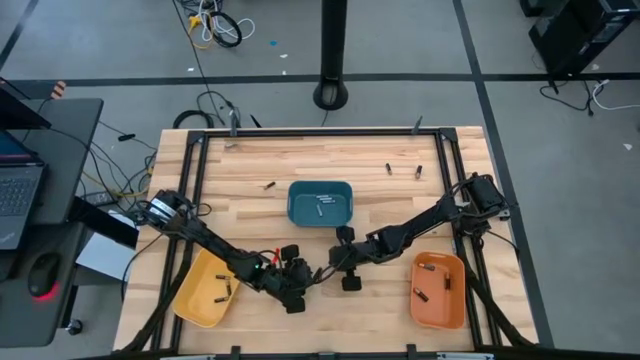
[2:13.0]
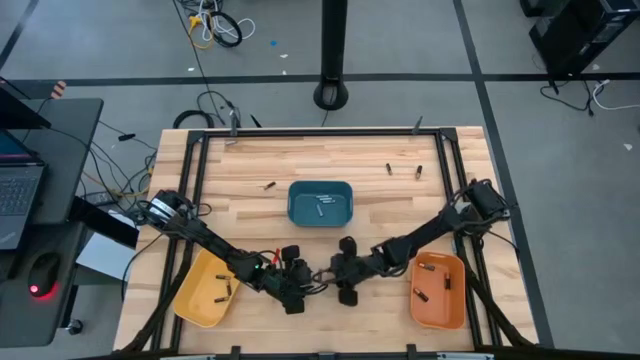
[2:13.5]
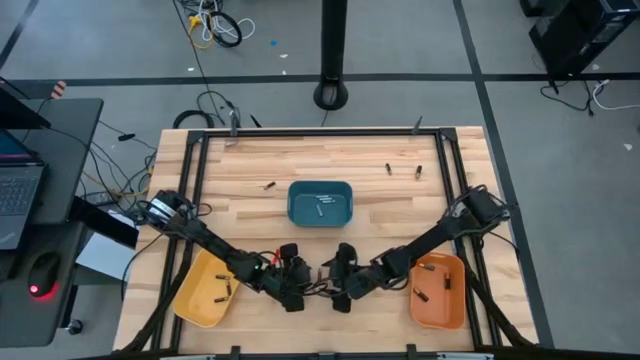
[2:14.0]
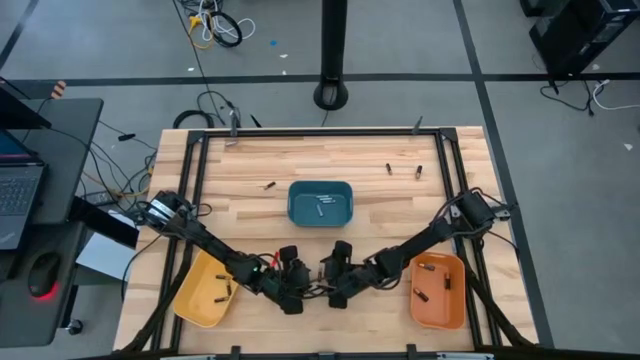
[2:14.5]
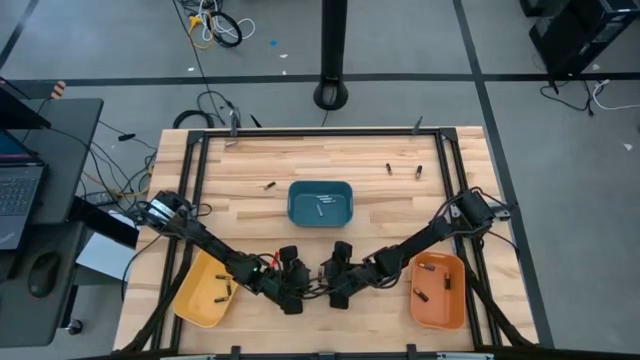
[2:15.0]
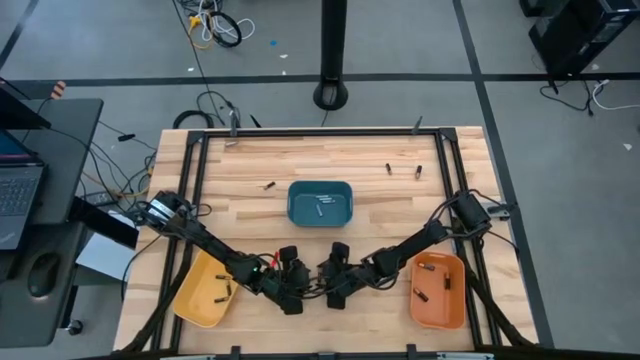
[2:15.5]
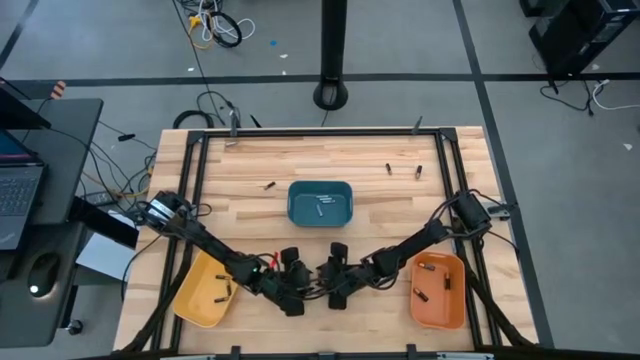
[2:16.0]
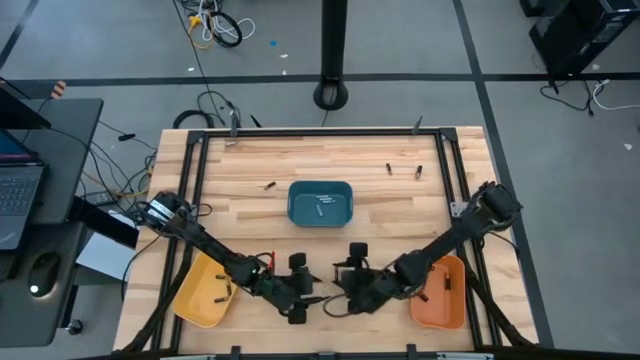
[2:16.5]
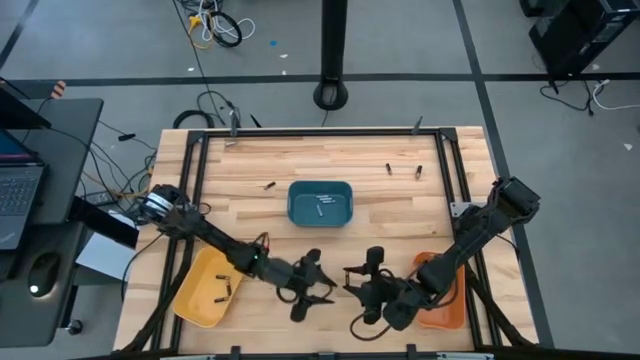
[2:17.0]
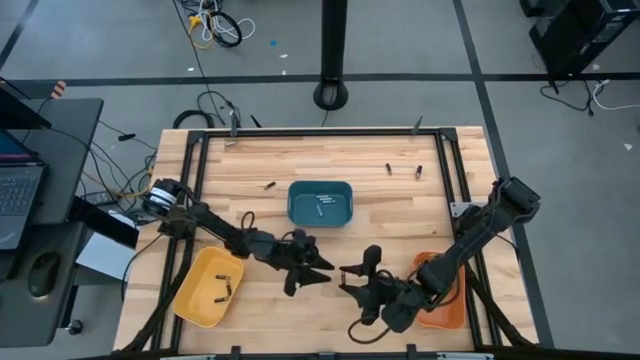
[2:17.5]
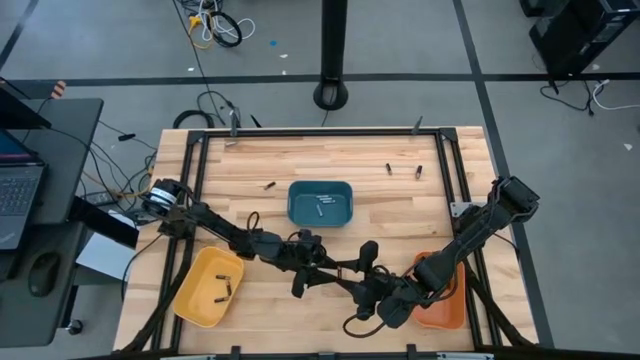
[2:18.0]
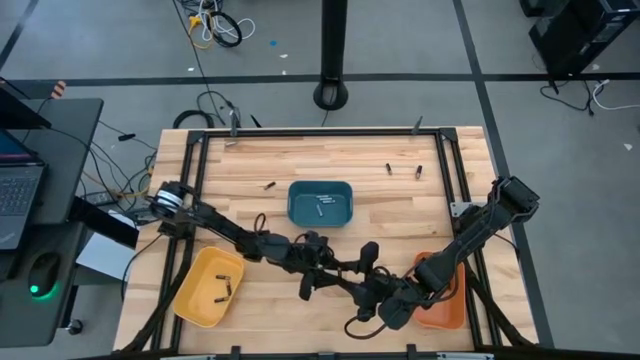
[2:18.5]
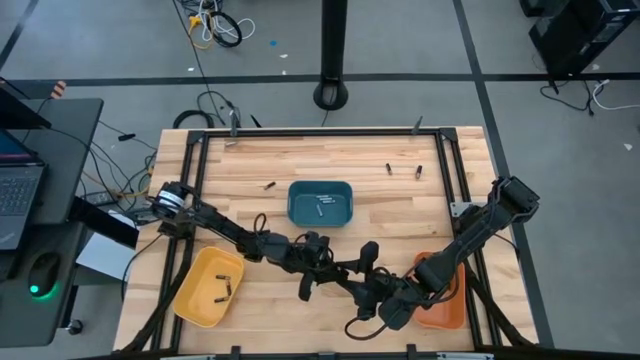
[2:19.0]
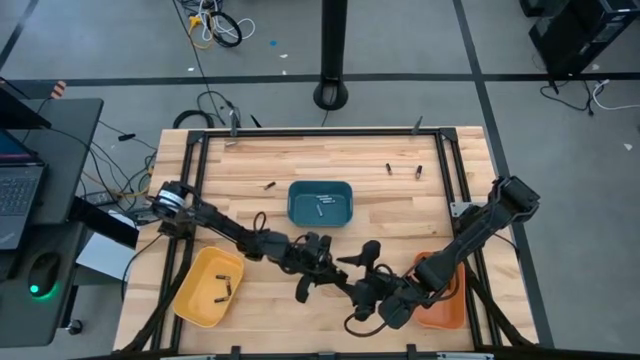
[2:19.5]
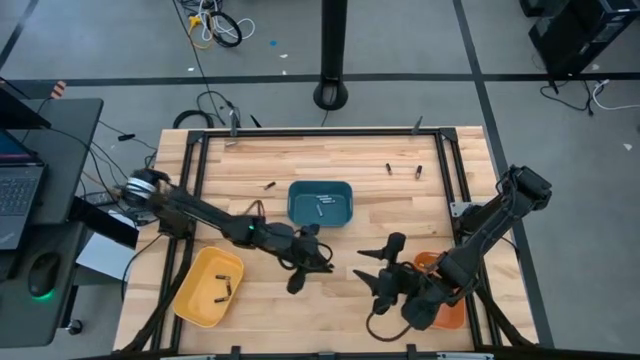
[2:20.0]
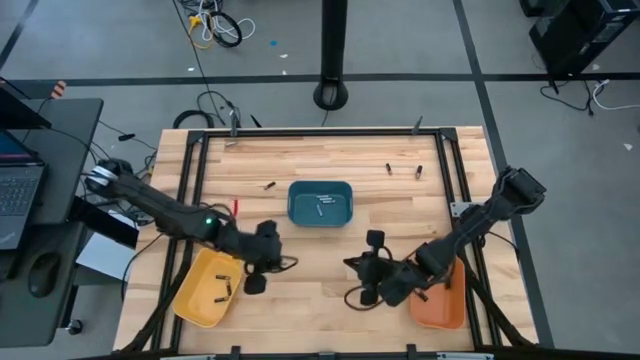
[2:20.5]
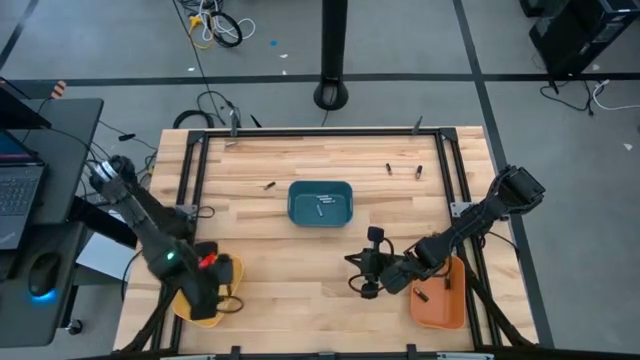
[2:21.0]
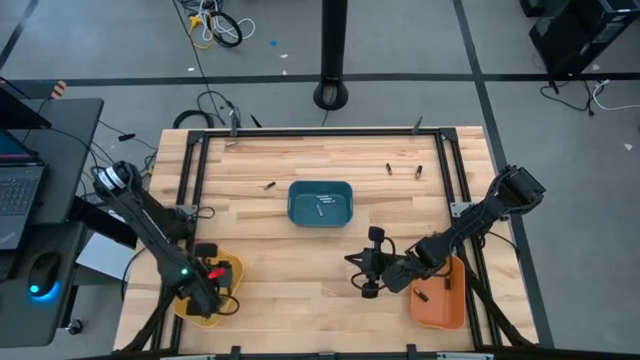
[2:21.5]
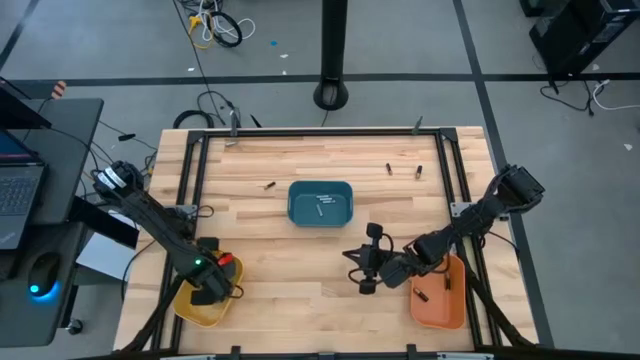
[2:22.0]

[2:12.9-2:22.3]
Task: Sort batteries
Put the black battery into the yellow bin

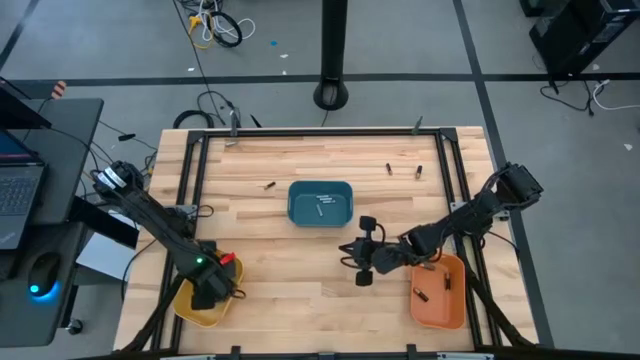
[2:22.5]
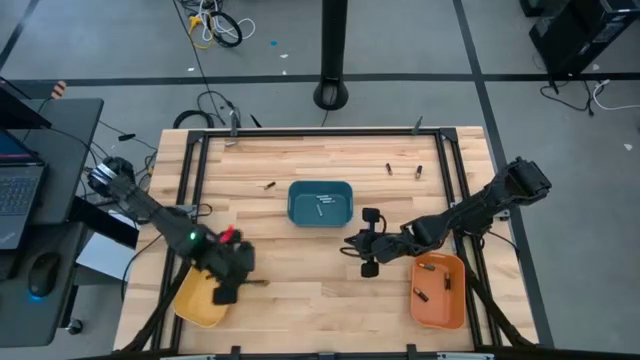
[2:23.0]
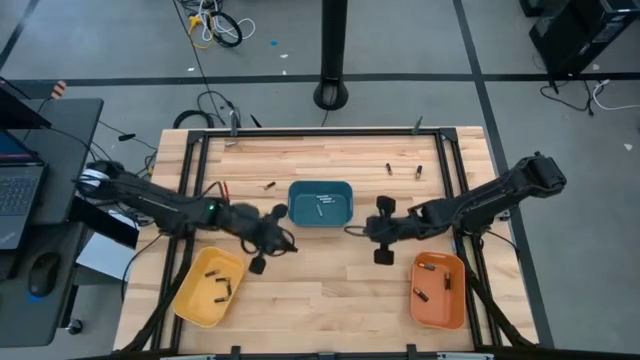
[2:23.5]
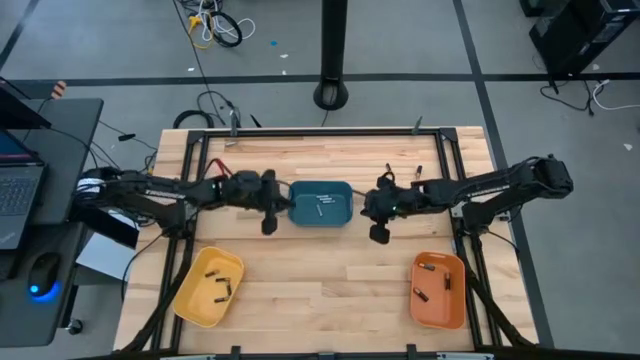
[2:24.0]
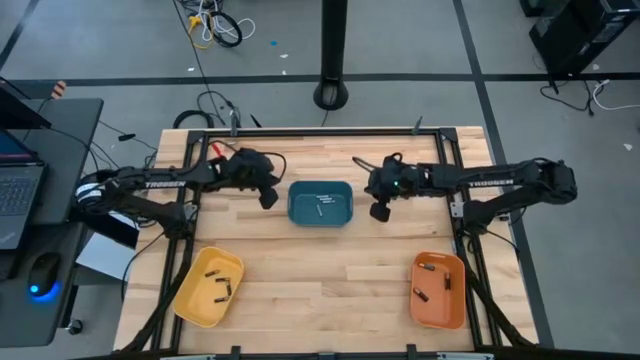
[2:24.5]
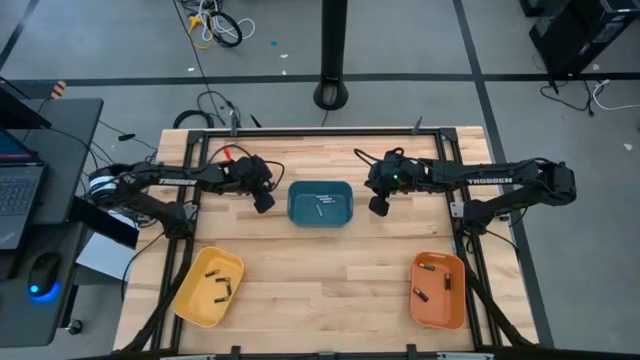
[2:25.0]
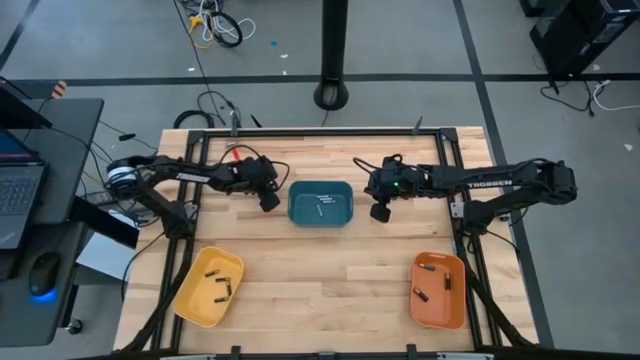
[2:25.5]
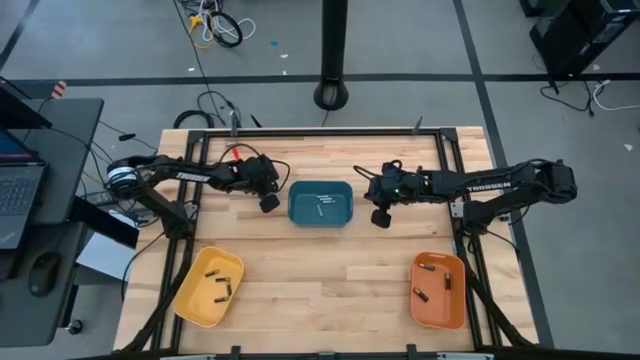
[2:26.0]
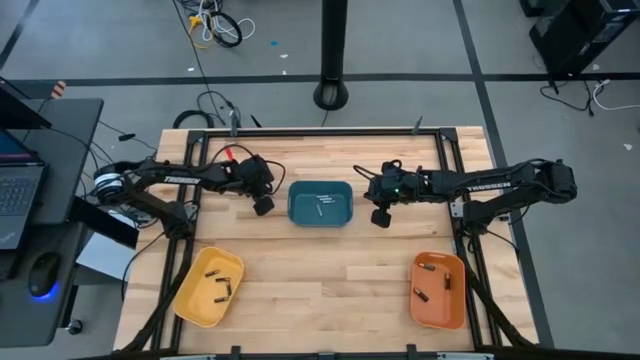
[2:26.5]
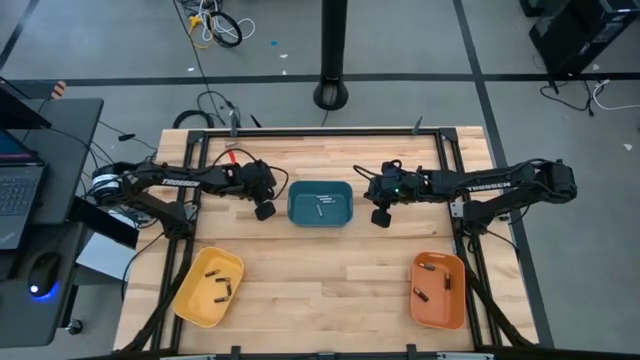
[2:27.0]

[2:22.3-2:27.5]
Put the black battery into the yellow bin

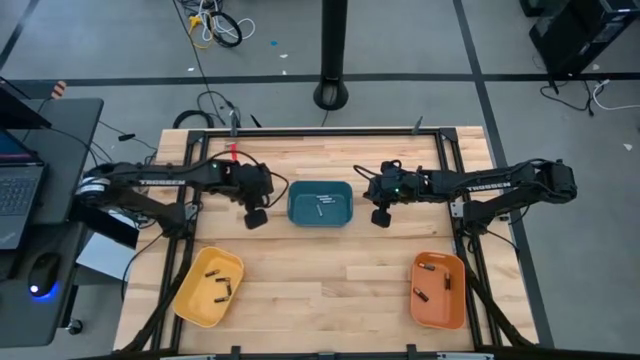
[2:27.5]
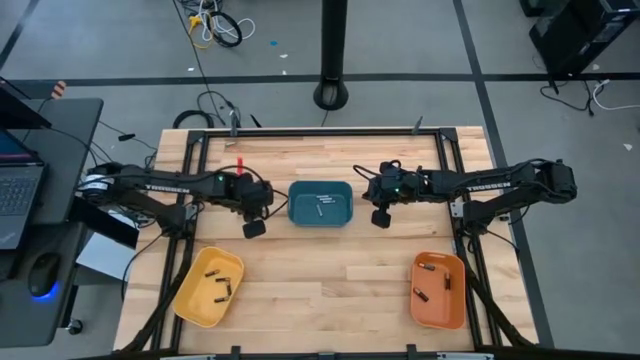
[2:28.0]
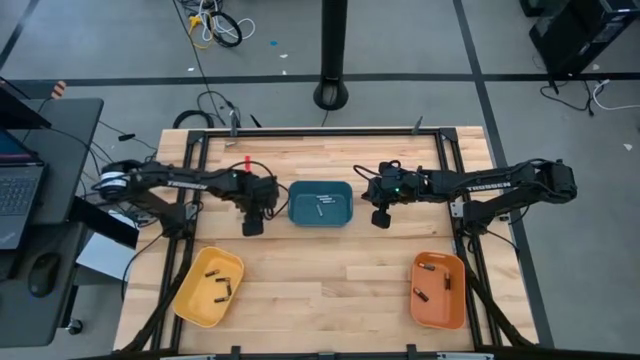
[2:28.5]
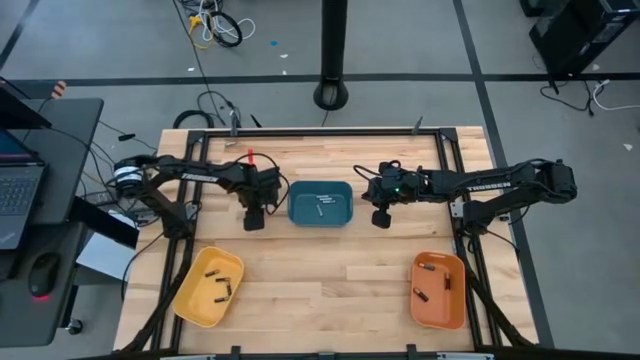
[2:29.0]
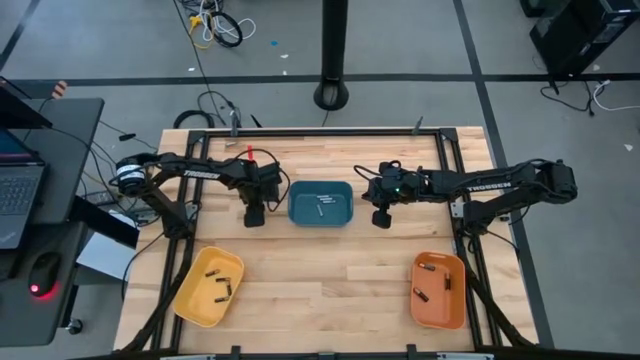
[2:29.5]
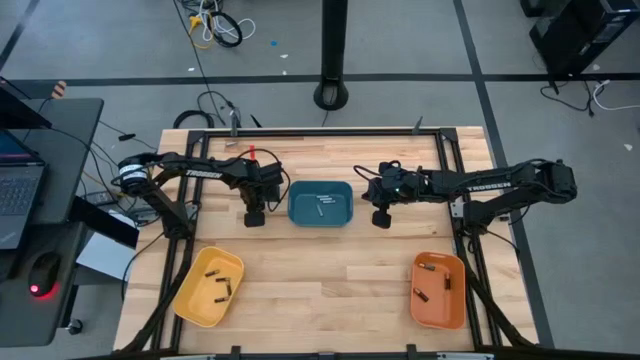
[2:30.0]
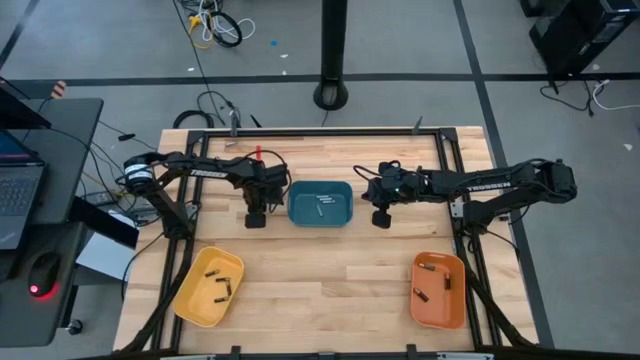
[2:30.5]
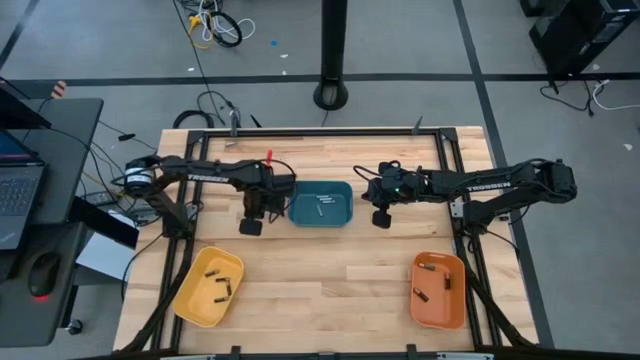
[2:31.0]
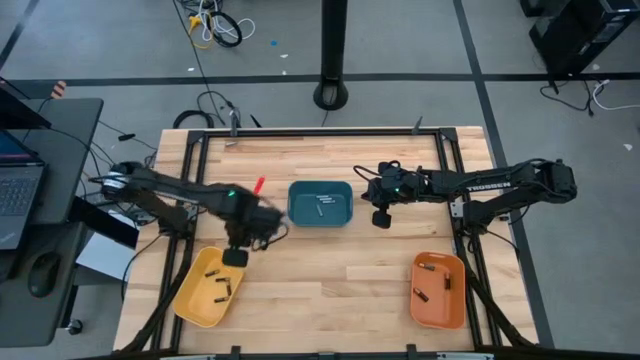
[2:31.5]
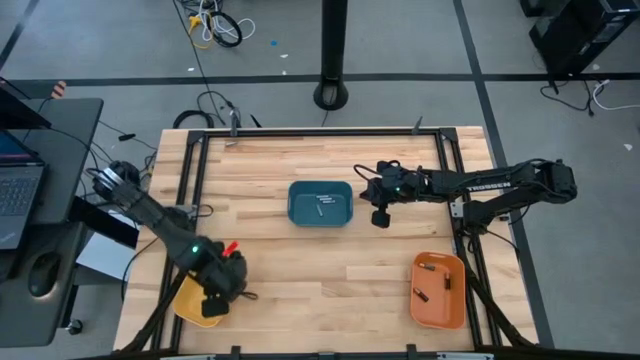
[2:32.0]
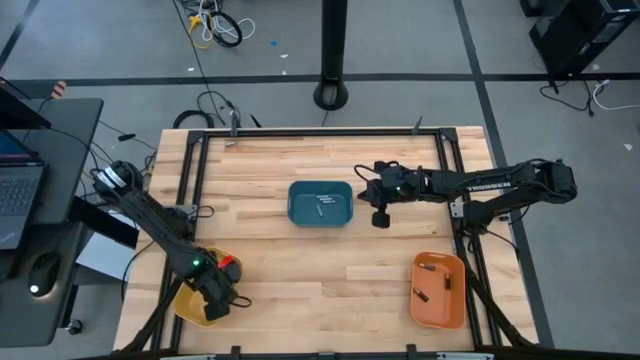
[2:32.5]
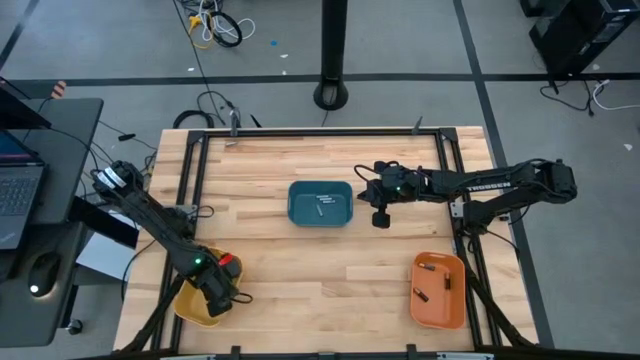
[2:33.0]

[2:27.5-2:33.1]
Put the black battery into the yellow bin

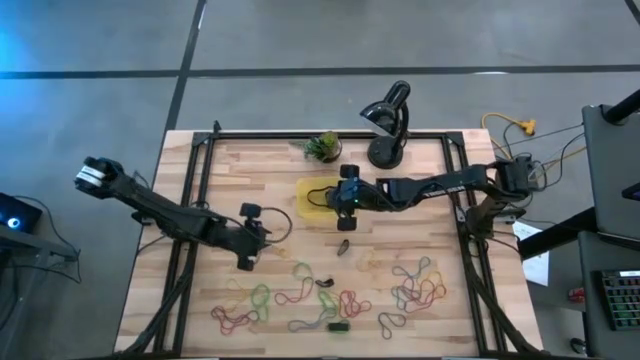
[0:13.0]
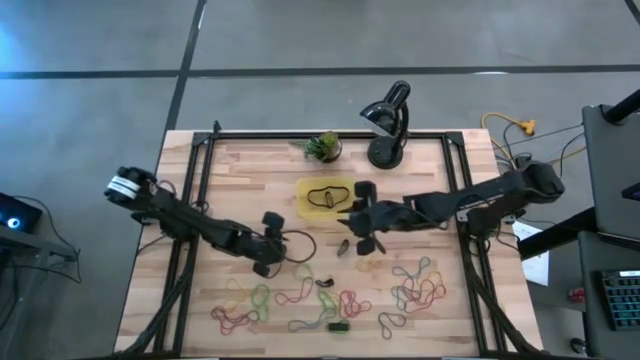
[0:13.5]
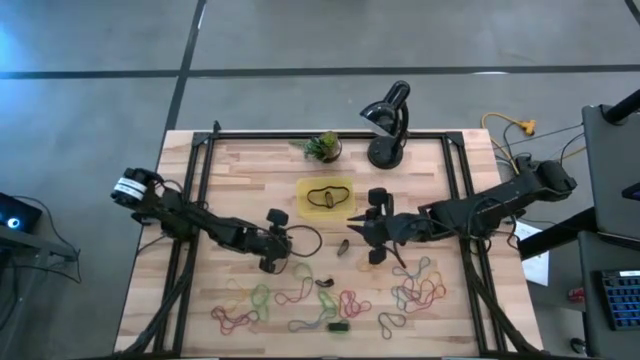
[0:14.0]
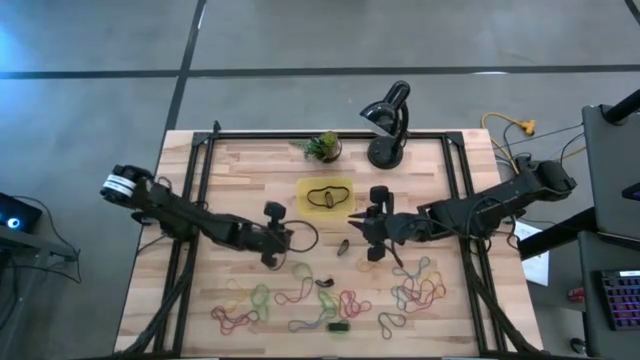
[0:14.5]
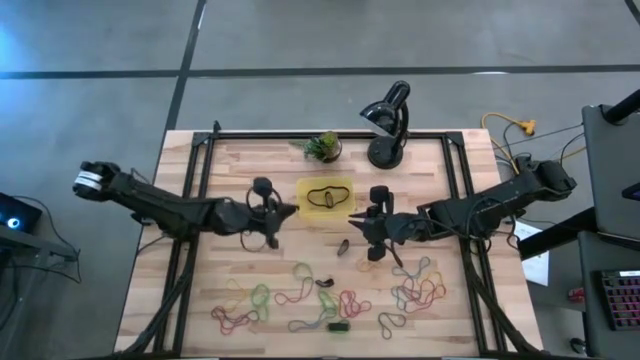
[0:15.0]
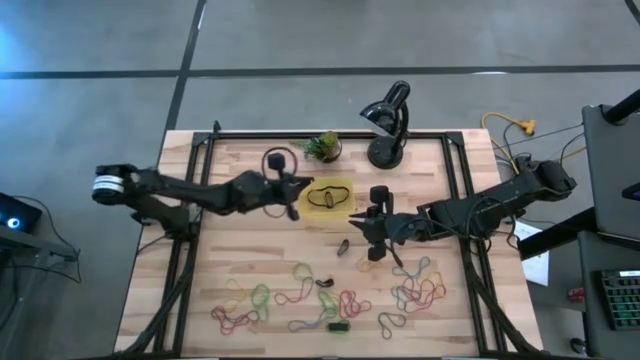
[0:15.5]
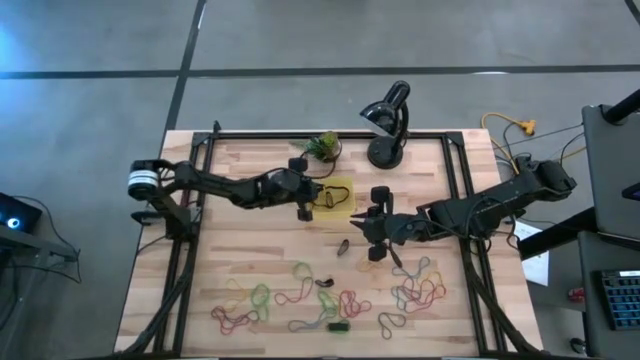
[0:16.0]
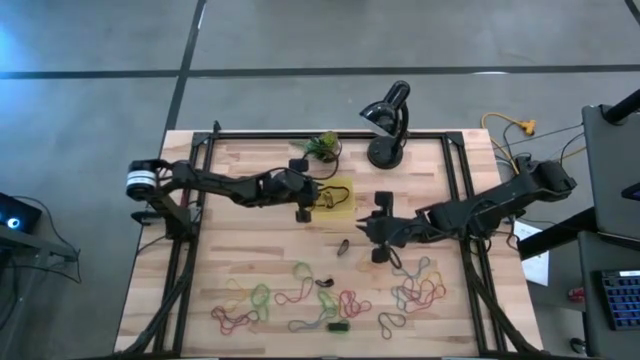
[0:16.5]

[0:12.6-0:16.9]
Task: Pick and place rubber bands into bin
Put the yellow rubber band in the yellow bin
